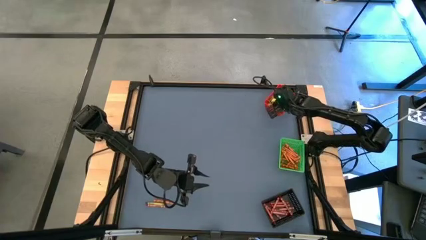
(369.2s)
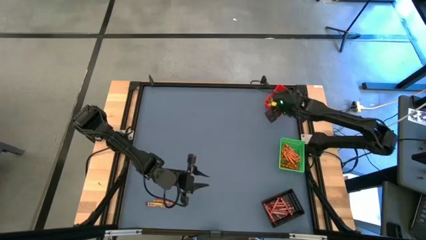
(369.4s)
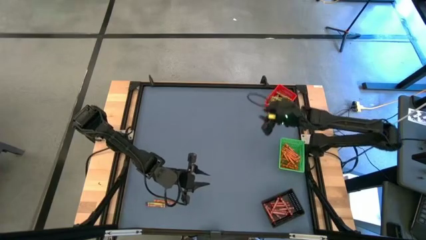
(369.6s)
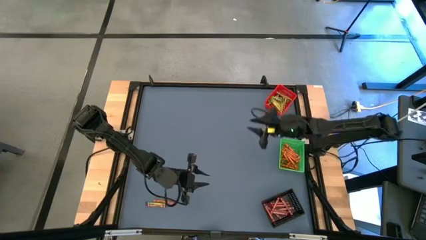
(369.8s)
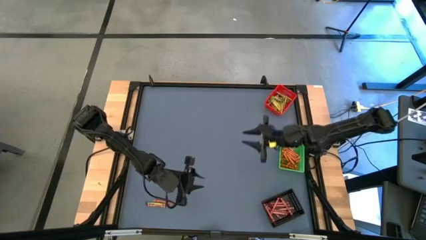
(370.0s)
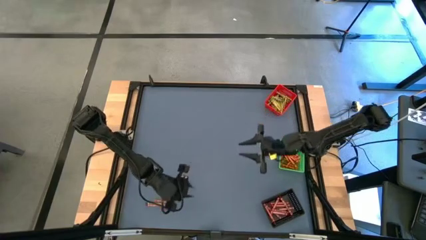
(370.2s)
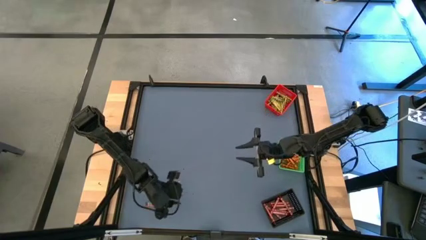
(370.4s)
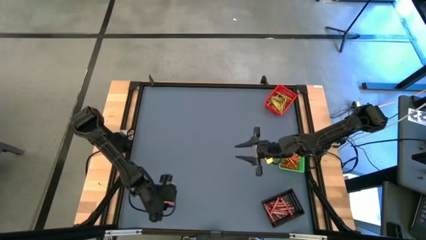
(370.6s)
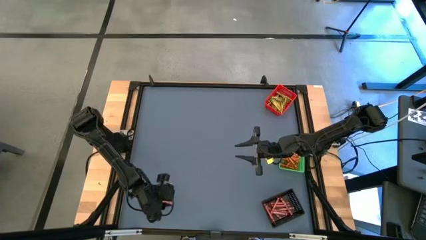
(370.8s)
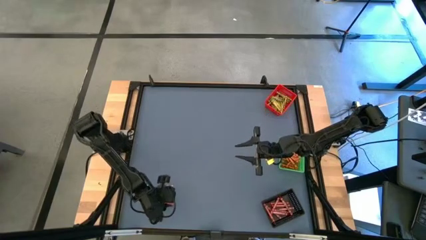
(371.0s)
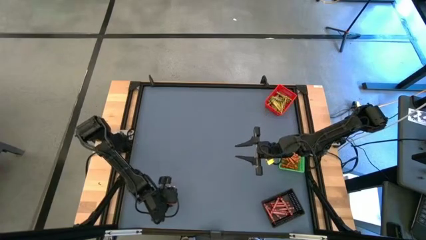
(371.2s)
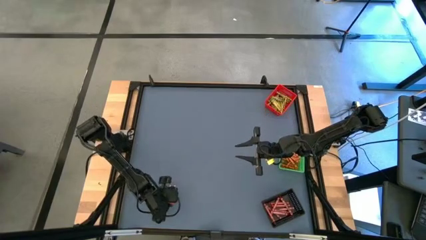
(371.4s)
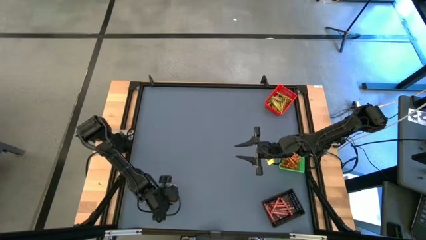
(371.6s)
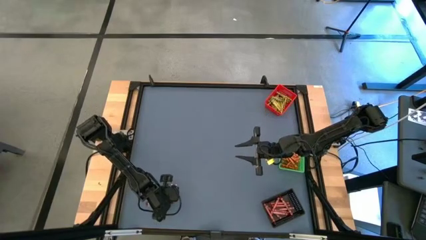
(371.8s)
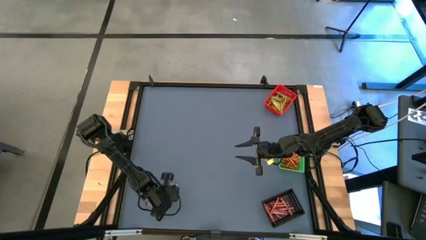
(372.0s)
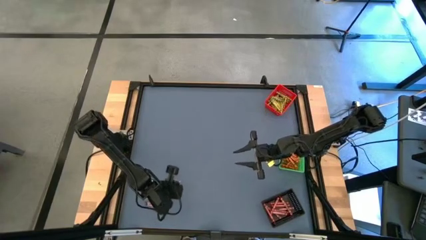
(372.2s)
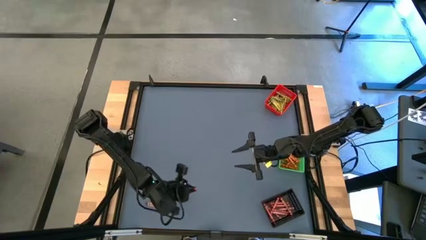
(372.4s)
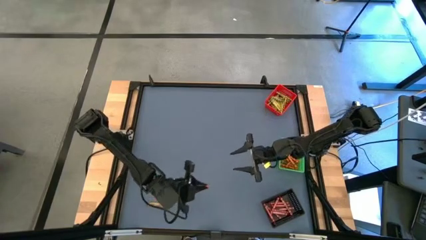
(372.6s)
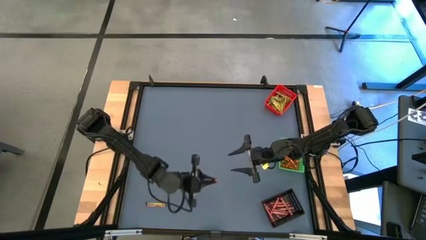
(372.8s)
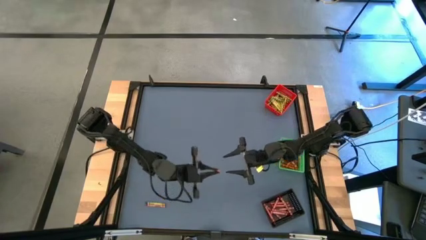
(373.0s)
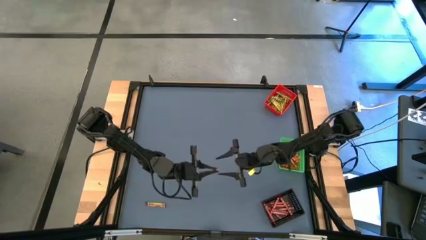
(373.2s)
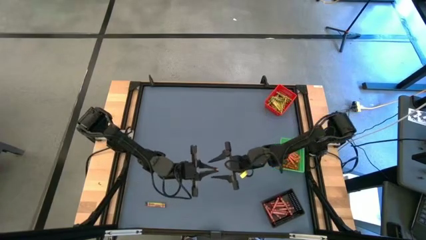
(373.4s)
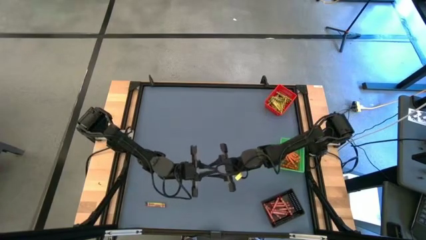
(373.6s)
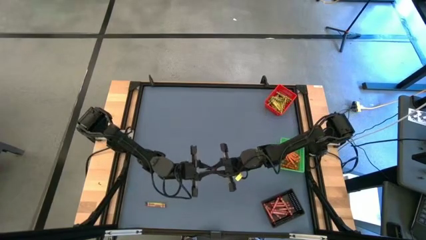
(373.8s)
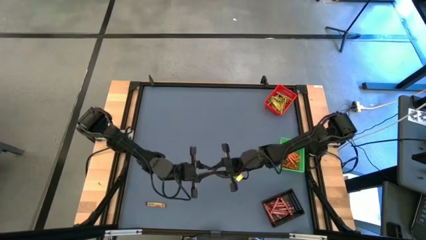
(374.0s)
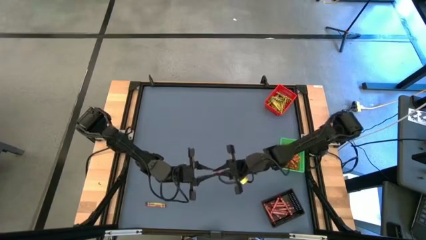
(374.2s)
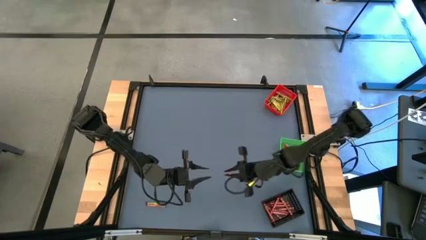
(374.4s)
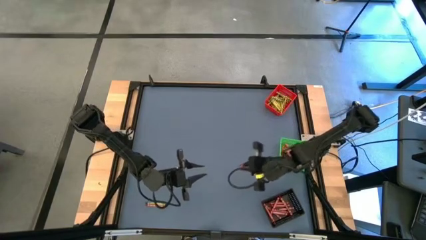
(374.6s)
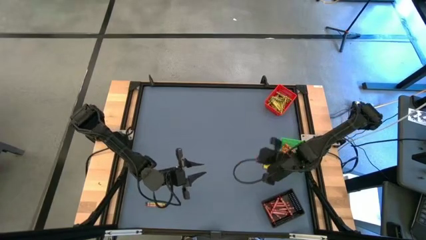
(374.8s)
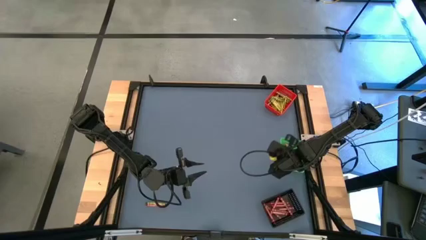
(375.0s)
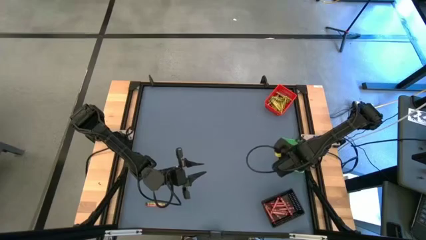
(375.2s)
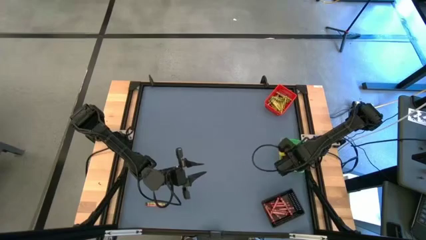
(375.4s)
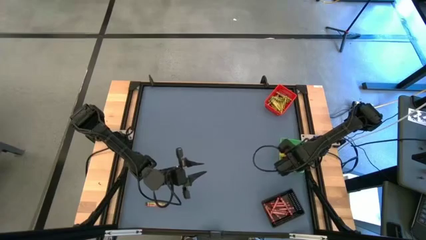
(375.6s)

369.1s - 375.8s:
Task: Sort crayons
Put the orange crayon into the green bin

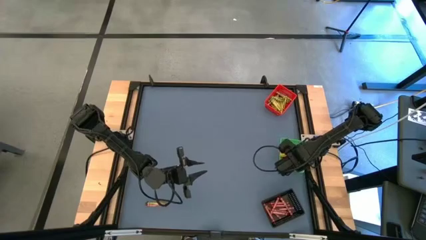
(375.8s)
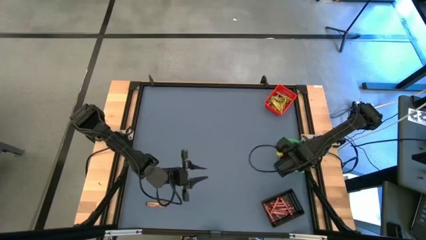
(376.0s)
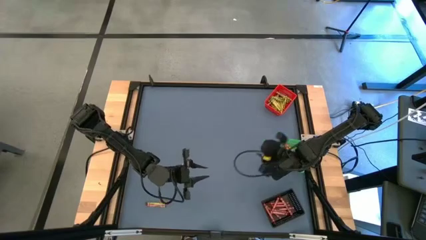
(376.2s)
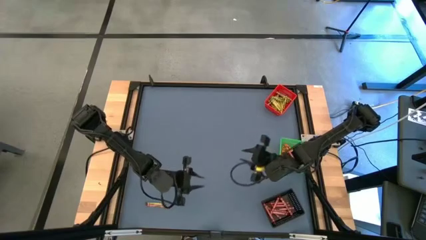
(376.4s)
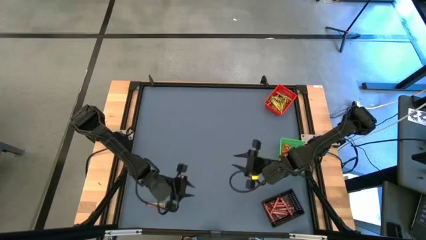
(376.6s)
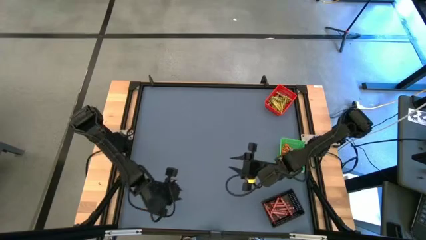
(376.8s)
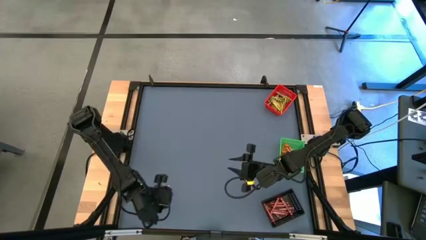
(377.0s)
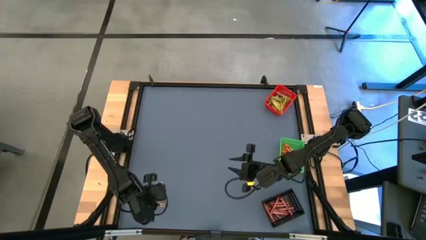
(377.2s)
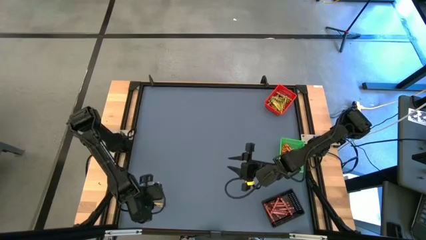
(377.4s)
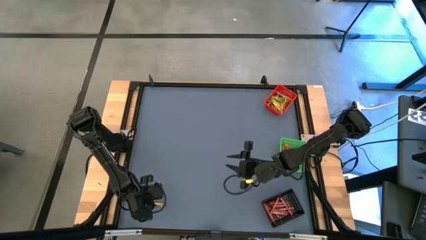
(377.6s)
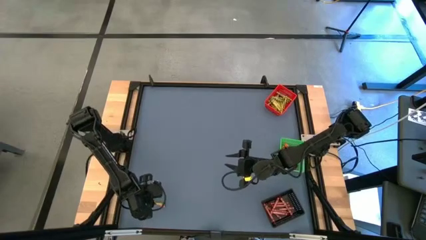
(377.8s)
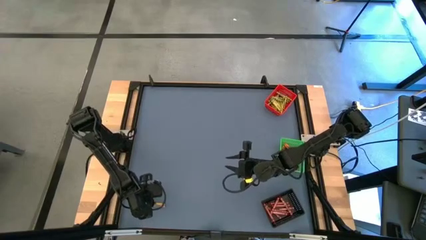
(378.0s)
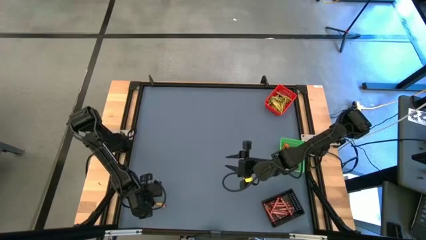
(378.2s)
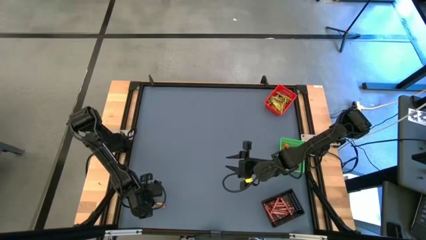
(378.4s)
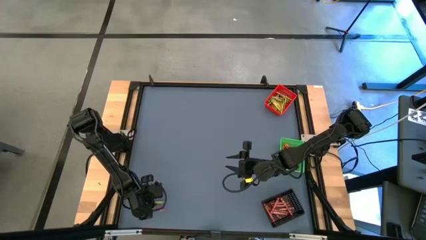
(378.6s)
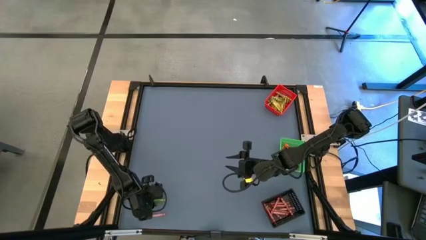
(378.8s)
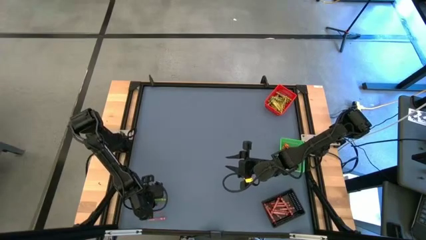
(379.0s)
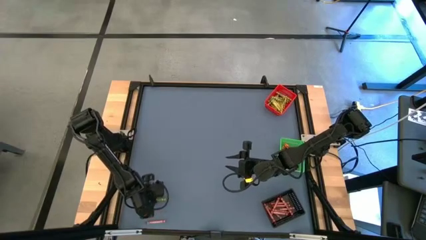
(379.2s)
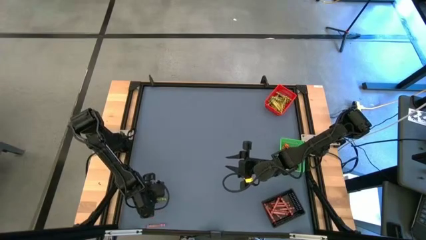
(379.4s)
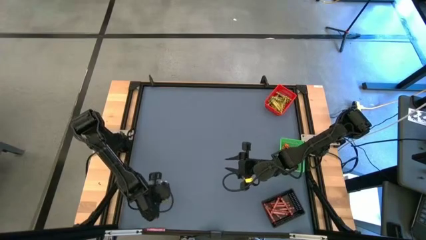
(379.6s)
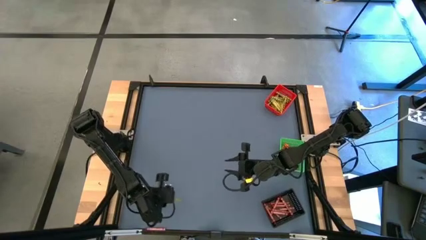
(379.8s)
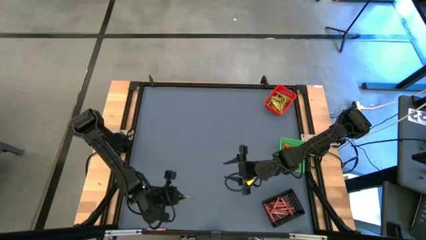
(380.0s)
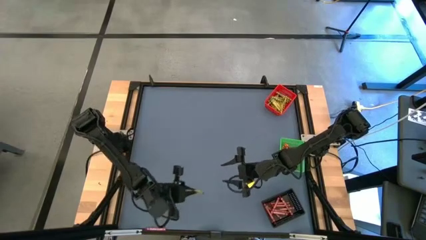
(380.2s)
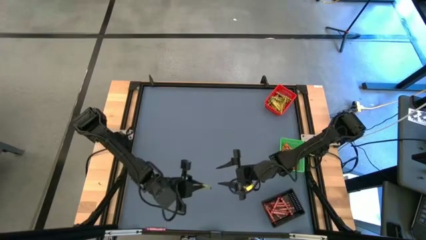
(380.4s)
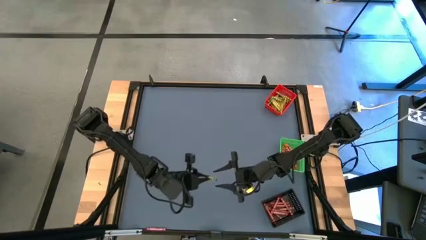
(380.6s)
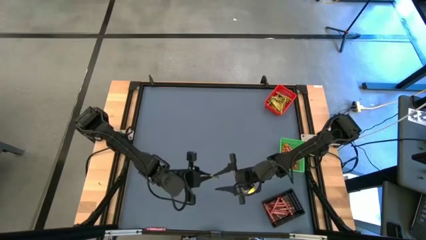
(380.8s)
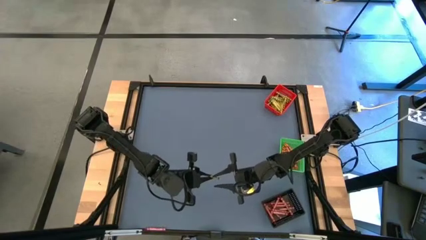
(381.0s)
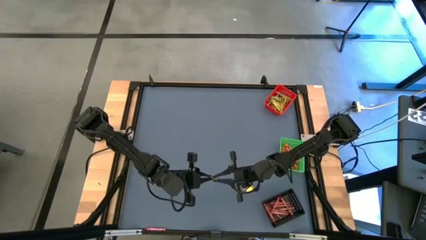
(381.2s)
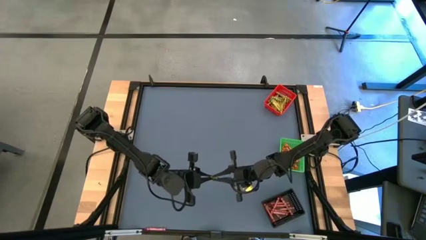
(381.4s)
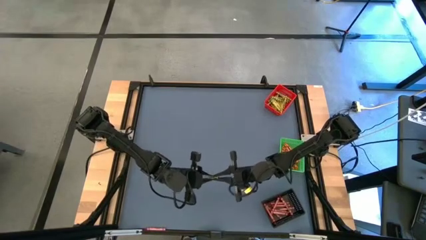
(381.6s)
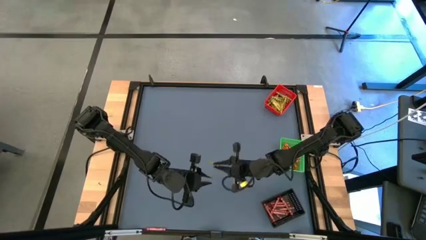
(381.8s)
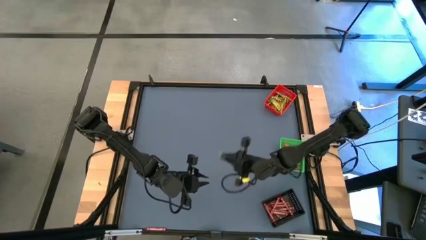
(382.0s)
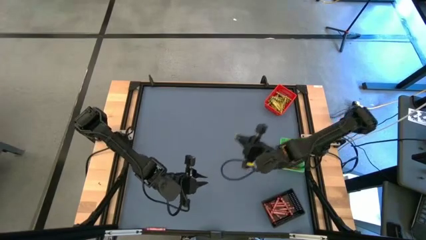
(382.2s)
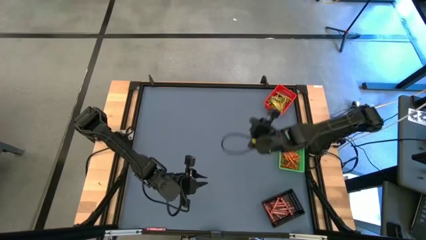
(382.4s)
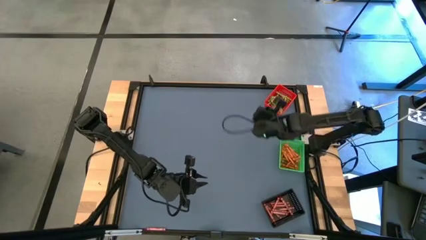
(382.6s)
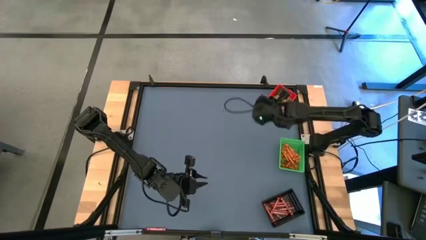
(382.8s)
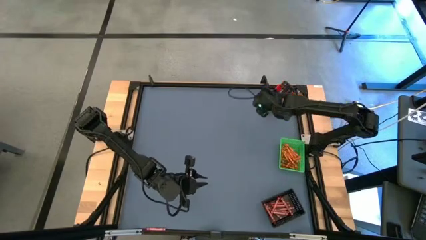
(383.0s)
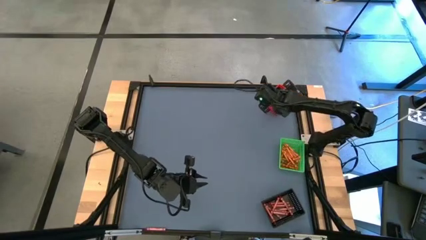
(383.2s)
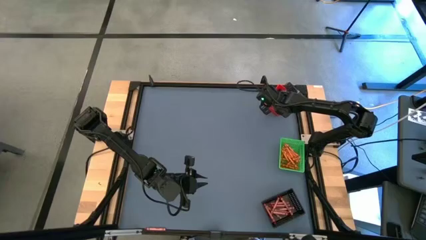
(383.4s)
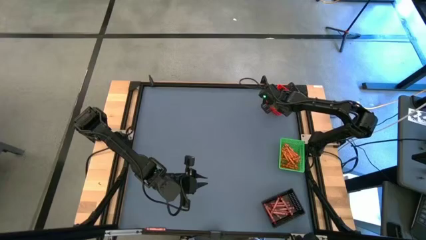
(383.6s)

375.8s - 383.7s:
Put the green crayon into the red bin
